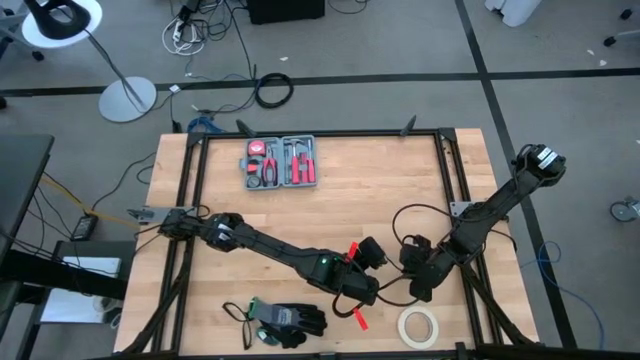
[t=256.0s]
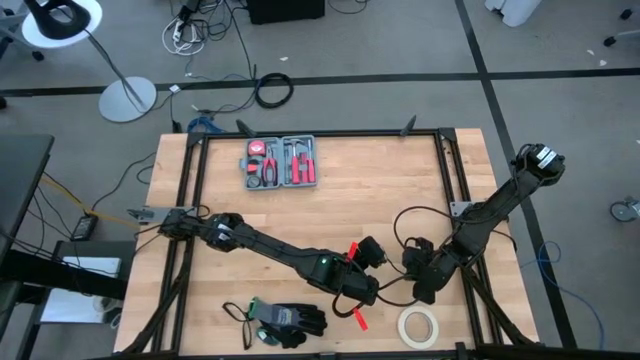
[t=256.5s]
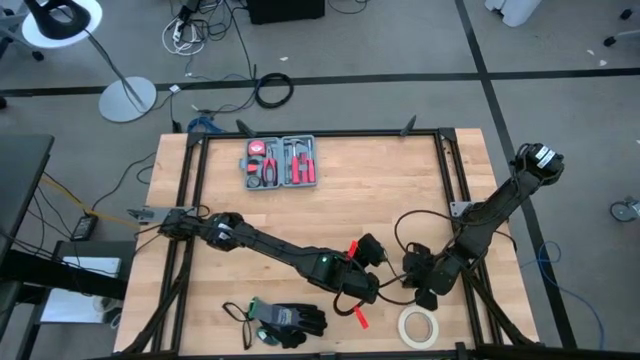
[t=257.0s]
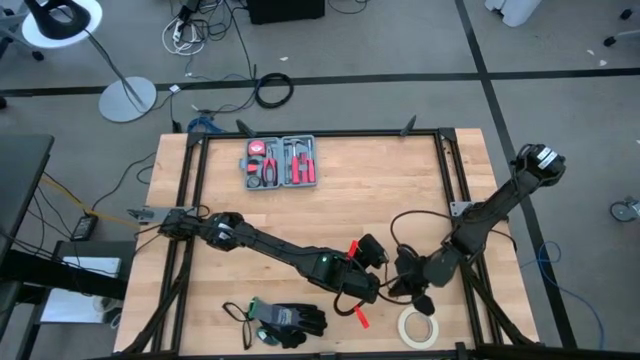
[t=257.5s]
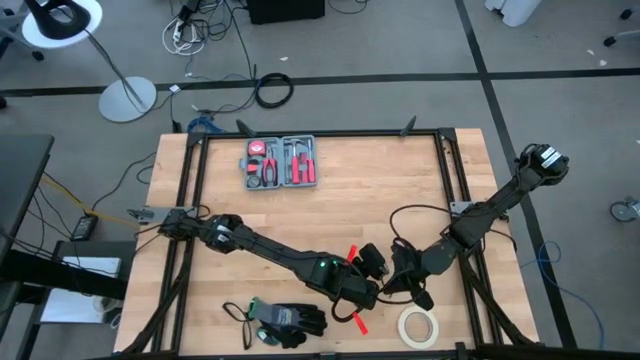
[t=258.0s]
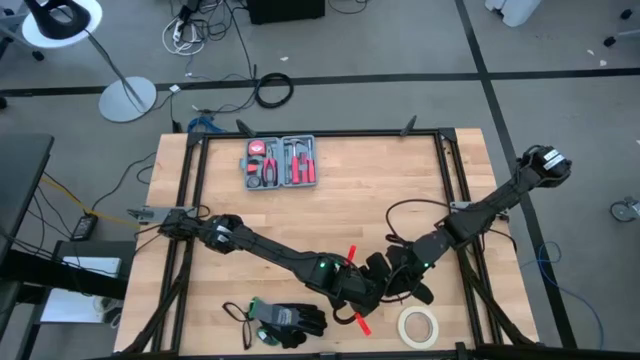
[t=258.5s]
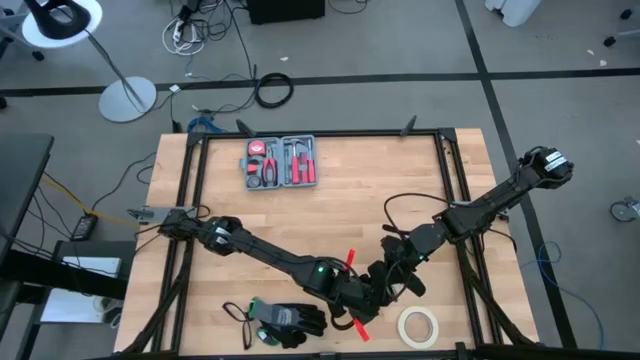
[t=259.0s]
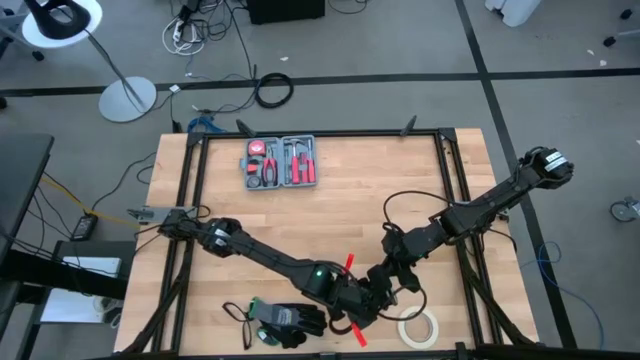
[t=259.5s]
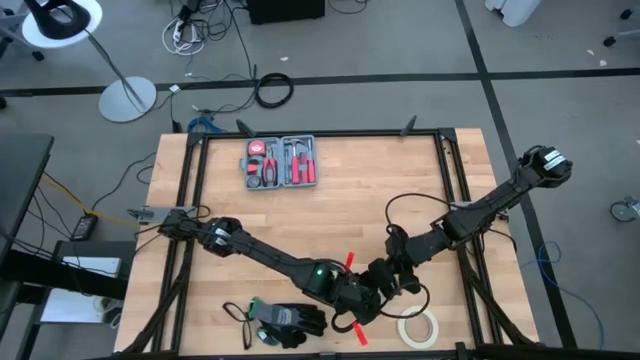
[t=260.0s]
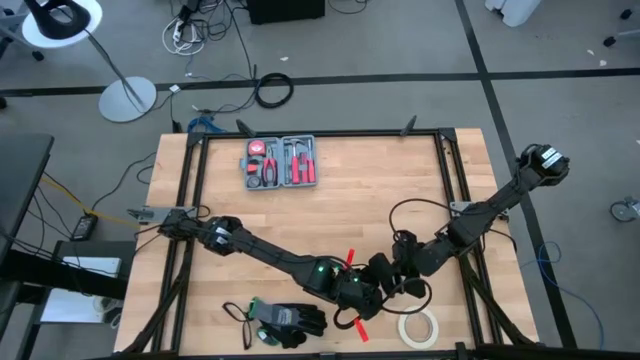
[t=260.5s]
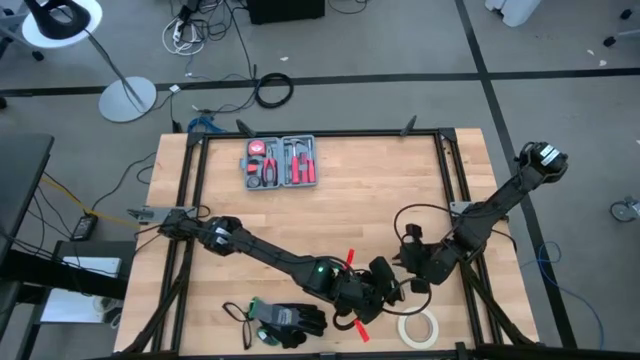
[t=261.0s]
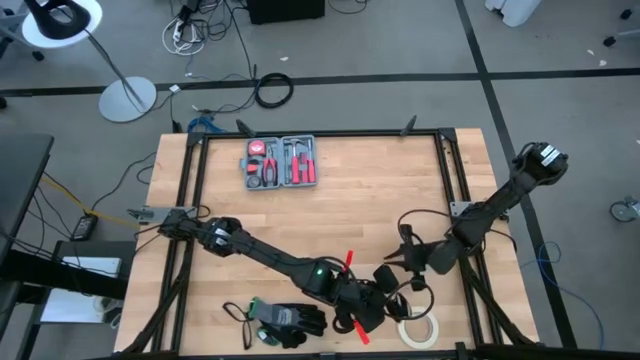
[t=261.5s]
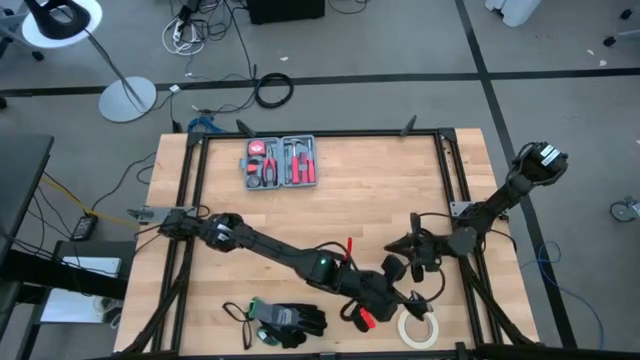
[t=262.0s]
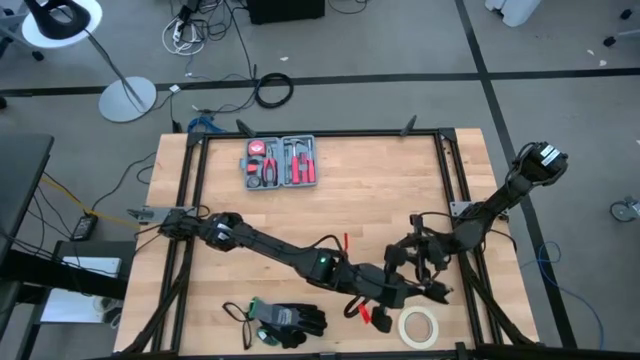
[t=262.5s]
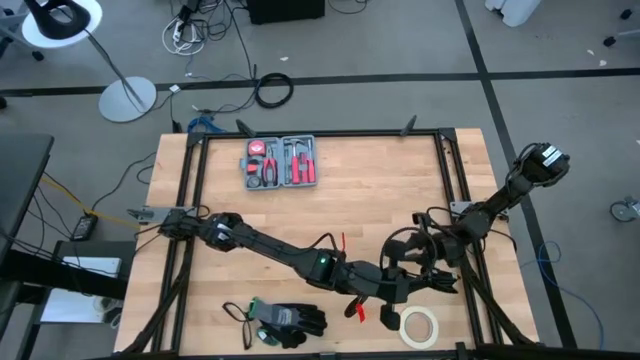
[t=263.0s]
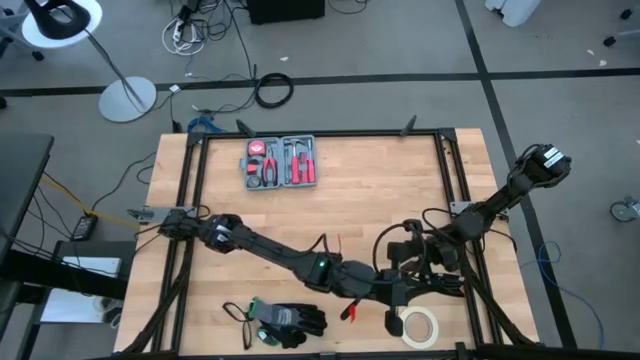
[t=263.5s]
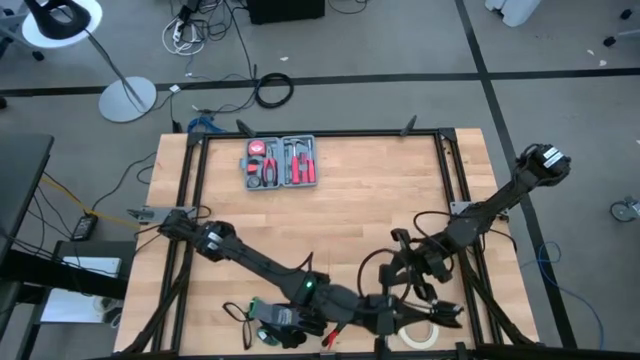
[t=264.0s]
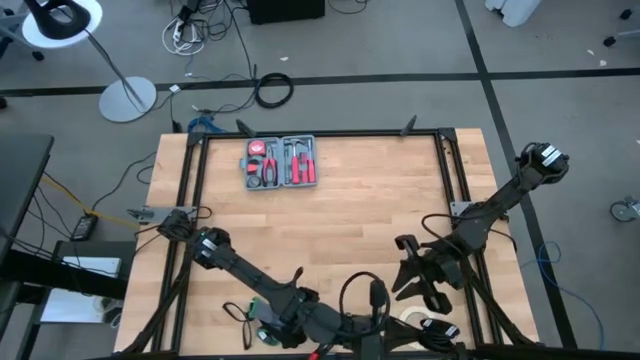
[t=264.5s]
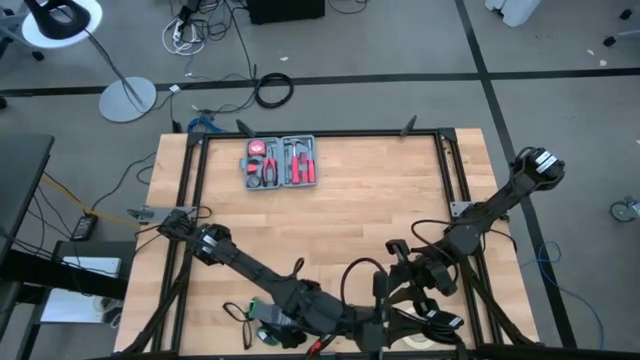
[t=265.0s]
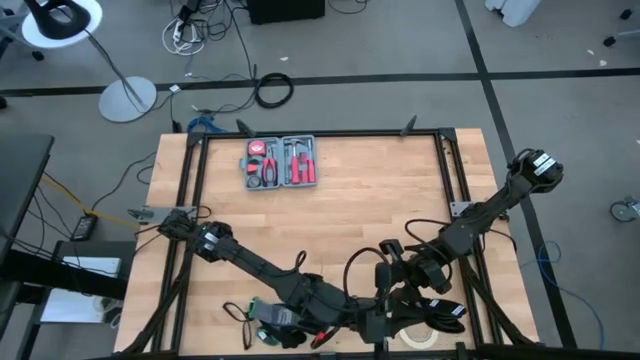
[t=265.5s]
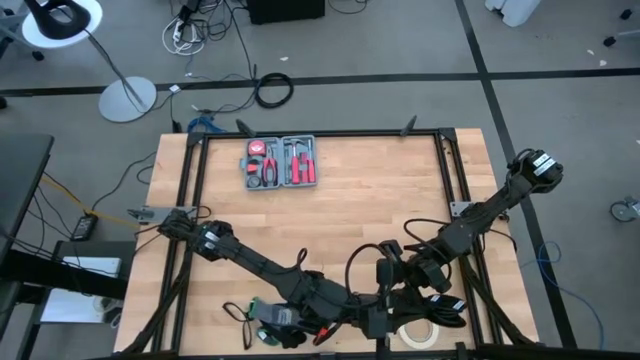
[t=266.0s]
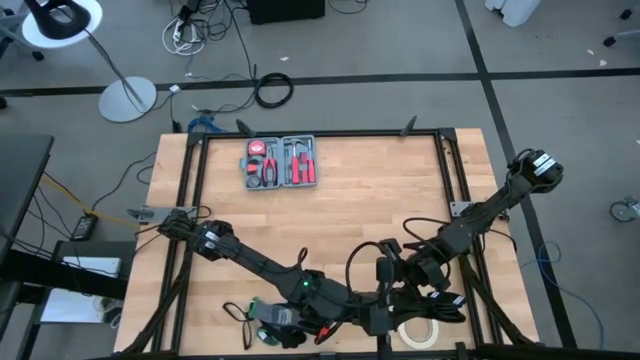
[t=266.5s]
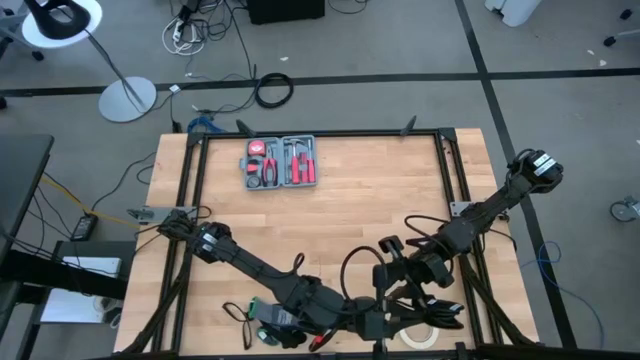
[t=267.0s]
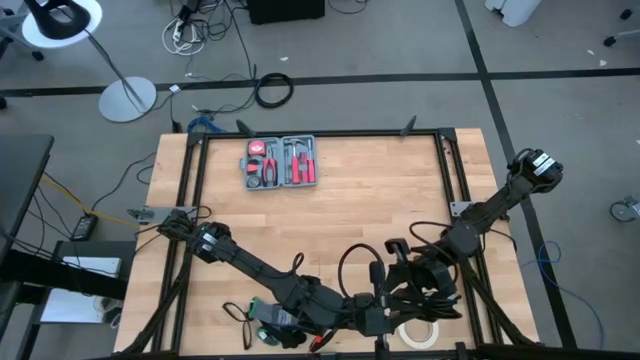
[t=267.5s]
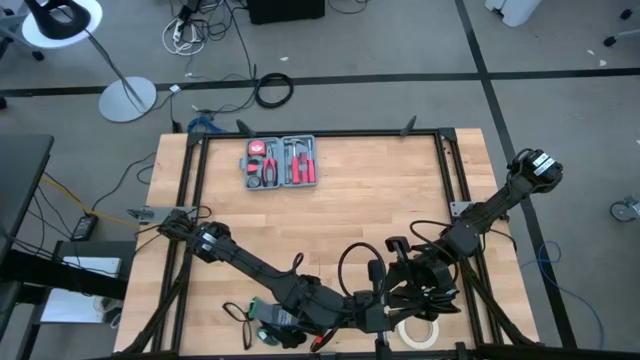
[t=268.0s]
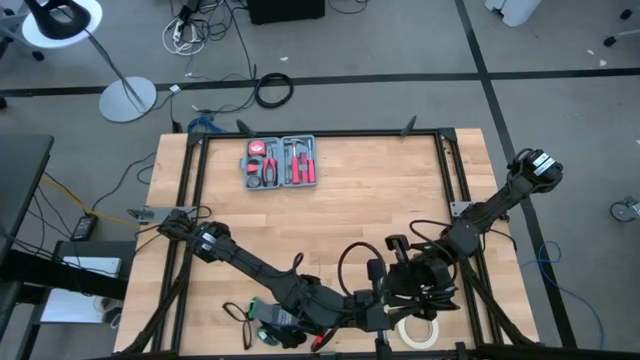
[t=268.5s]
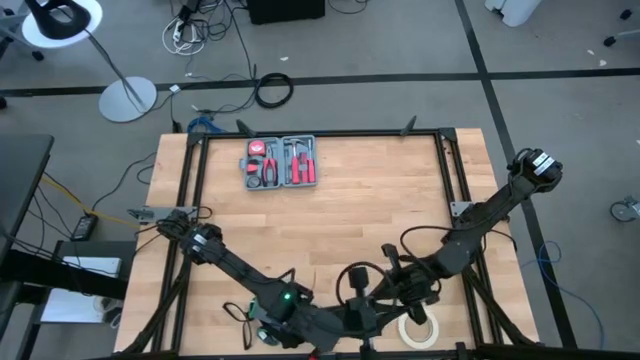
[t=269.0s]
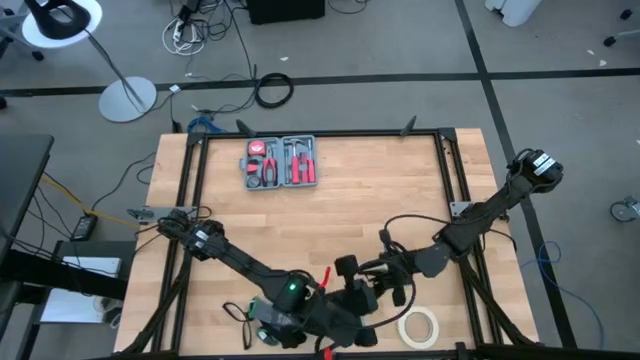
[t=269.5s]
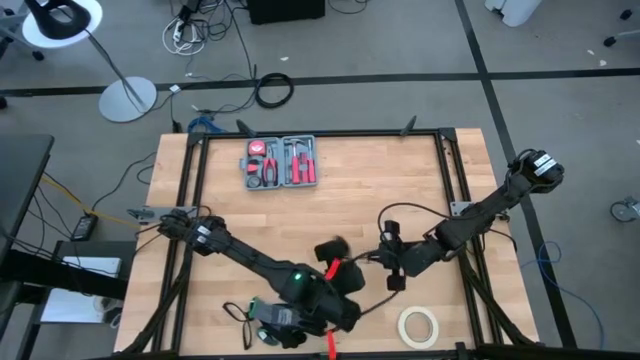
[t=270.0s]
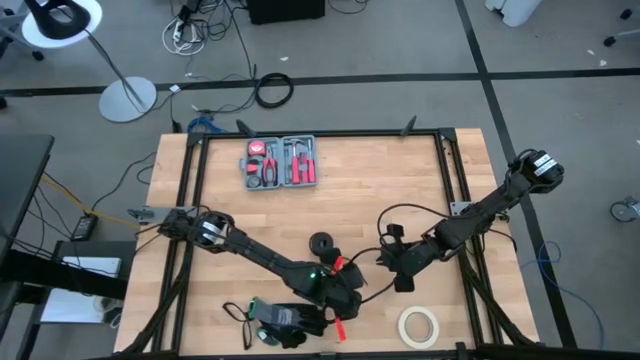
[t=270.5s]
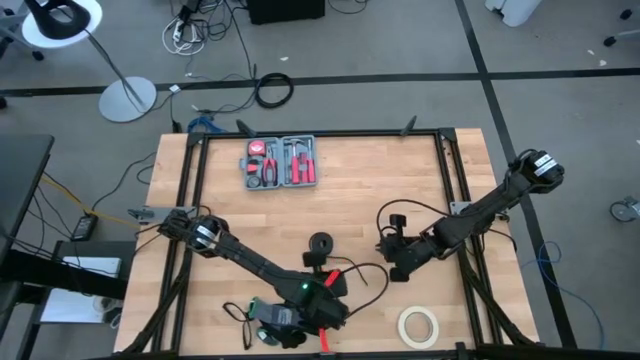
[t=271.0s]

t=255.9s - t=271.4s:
Task: Coil cords
Coil the black wire cable into the black spool
